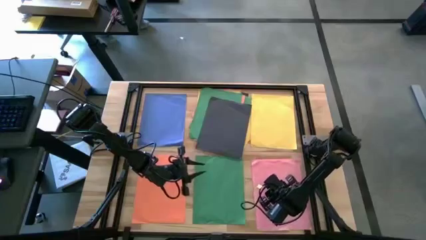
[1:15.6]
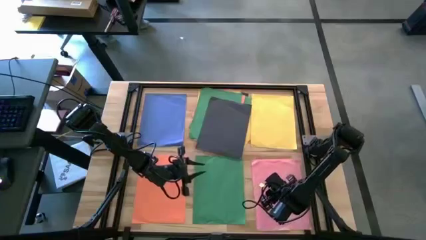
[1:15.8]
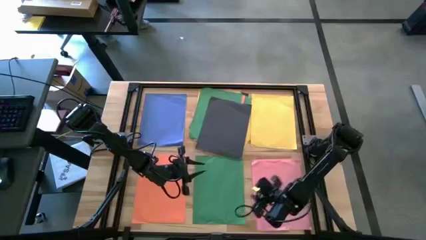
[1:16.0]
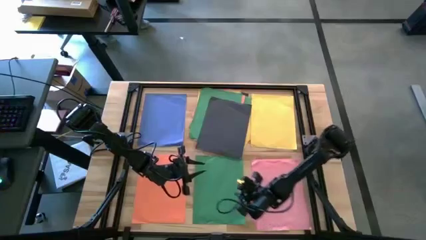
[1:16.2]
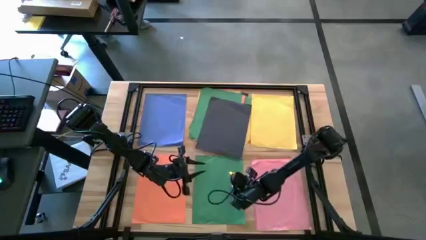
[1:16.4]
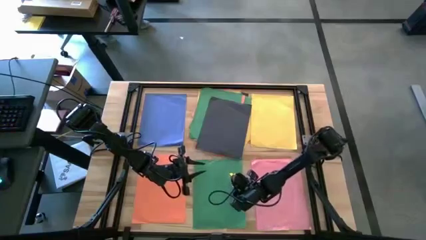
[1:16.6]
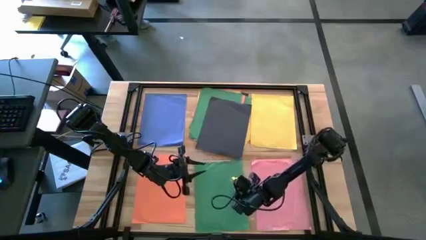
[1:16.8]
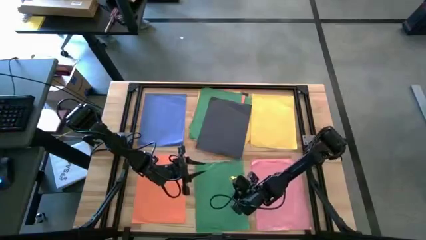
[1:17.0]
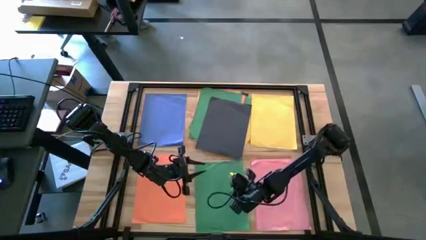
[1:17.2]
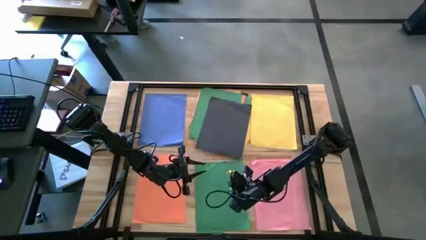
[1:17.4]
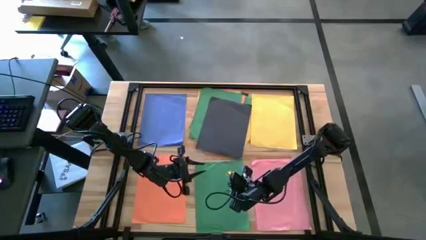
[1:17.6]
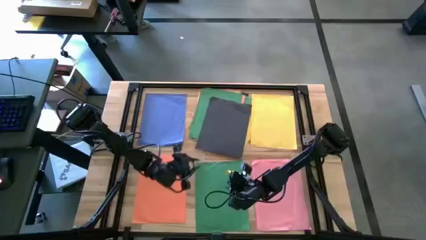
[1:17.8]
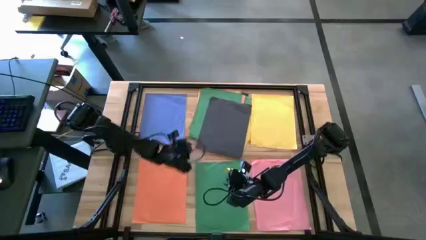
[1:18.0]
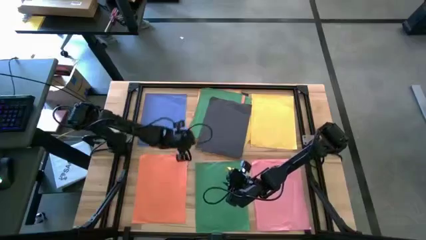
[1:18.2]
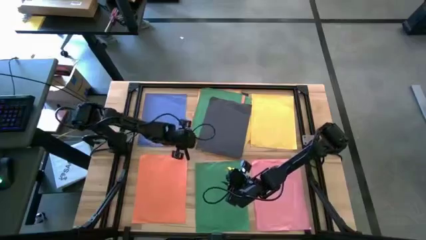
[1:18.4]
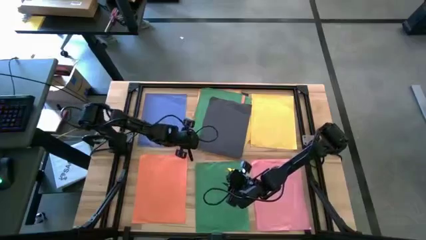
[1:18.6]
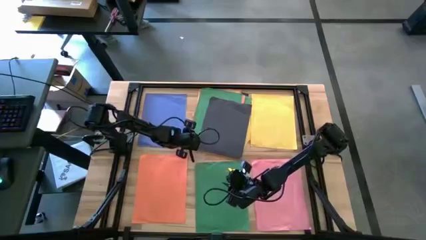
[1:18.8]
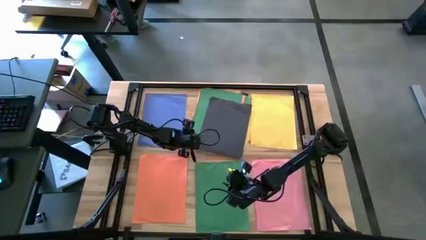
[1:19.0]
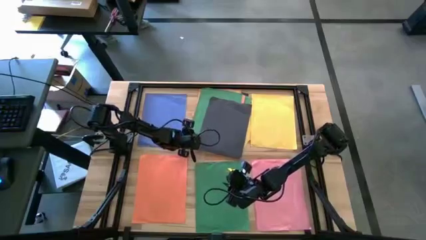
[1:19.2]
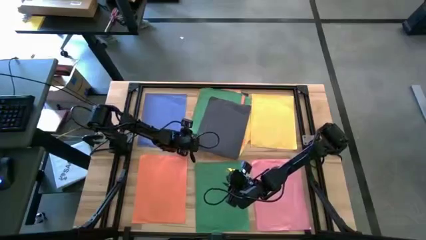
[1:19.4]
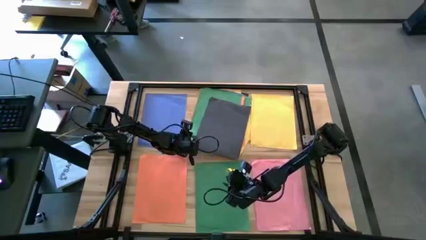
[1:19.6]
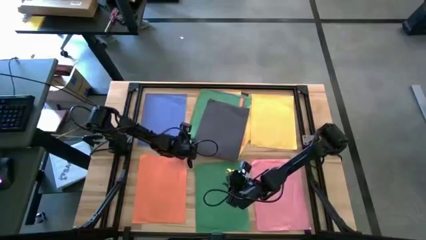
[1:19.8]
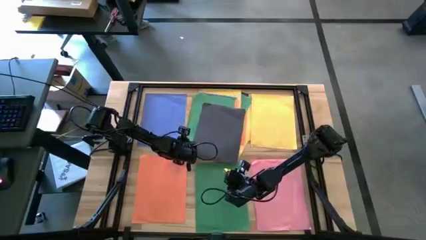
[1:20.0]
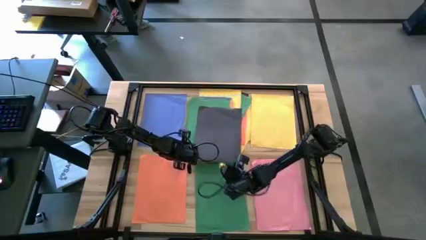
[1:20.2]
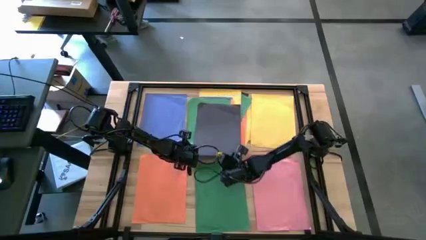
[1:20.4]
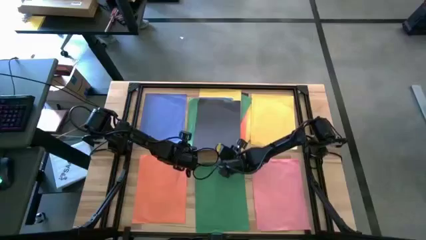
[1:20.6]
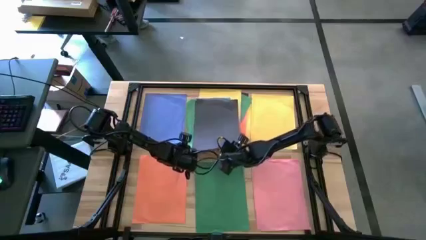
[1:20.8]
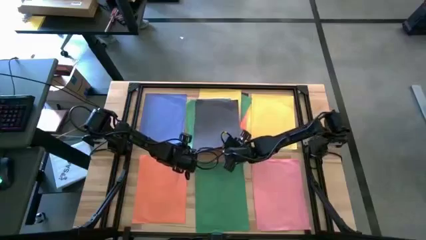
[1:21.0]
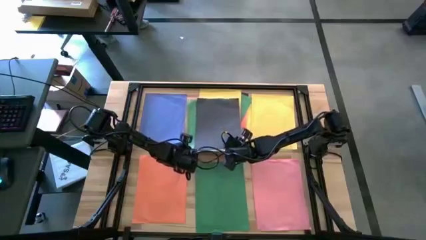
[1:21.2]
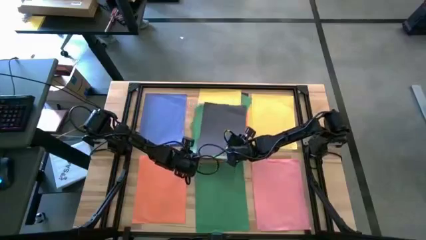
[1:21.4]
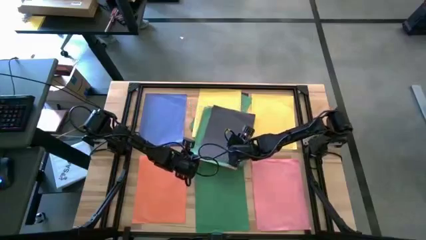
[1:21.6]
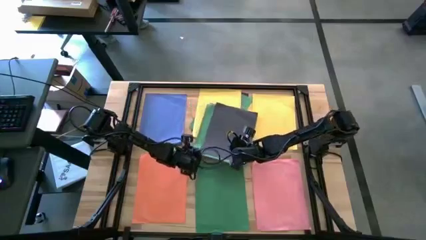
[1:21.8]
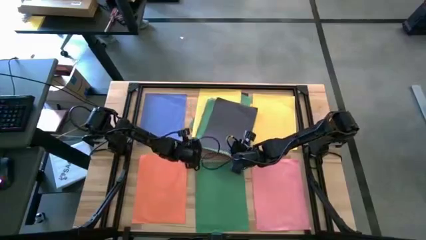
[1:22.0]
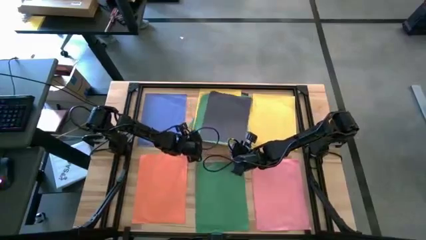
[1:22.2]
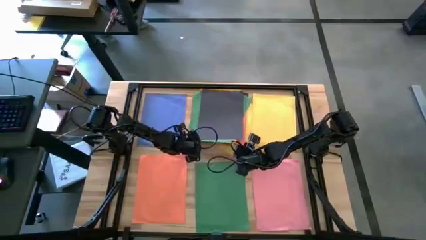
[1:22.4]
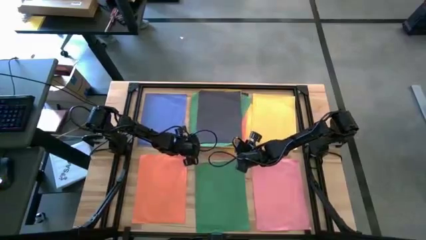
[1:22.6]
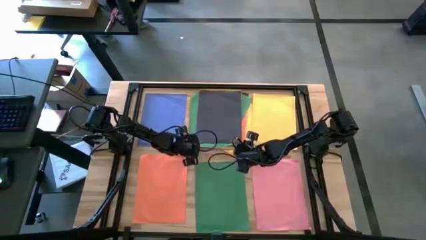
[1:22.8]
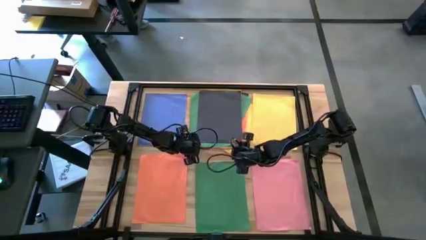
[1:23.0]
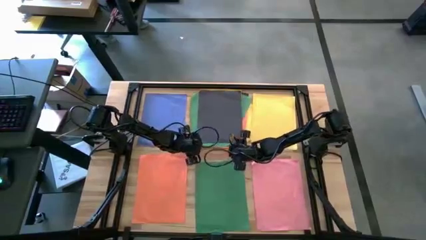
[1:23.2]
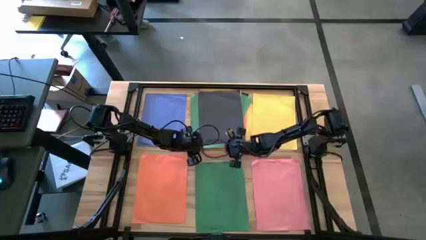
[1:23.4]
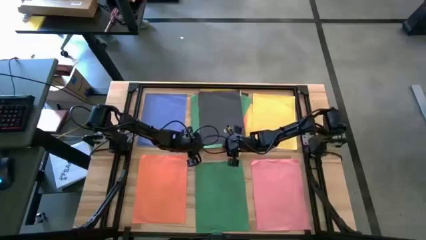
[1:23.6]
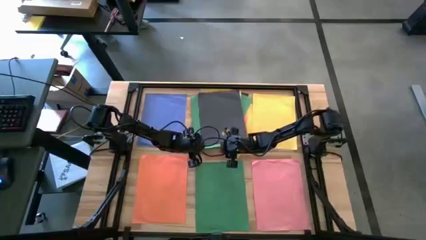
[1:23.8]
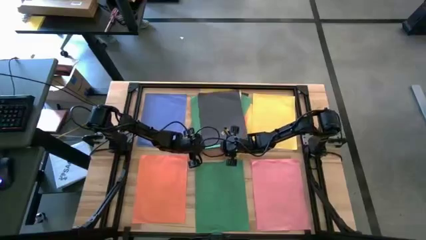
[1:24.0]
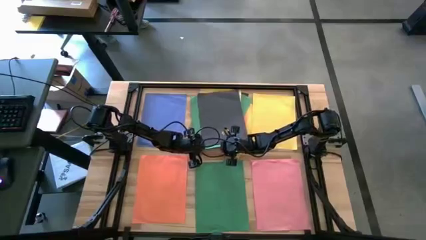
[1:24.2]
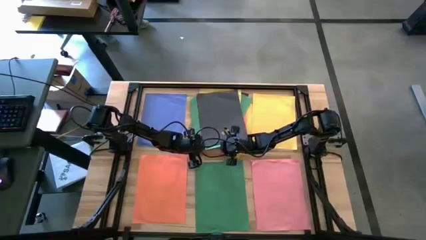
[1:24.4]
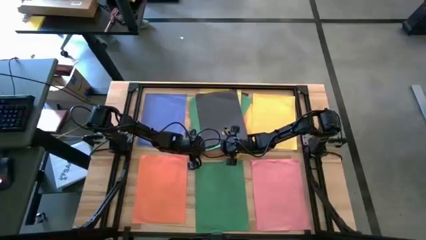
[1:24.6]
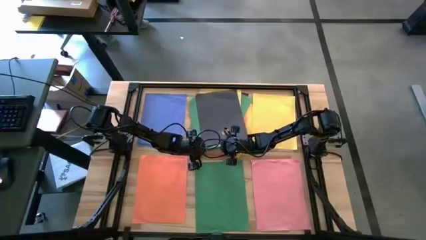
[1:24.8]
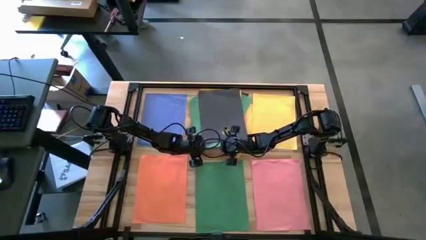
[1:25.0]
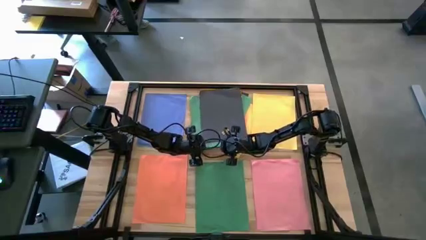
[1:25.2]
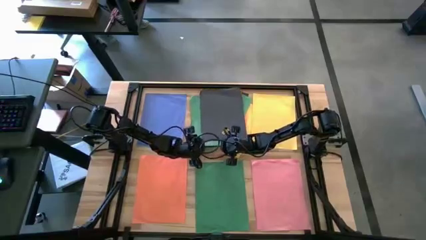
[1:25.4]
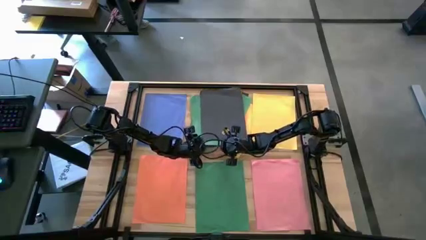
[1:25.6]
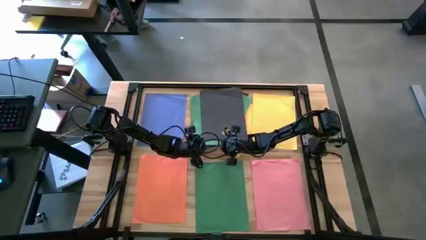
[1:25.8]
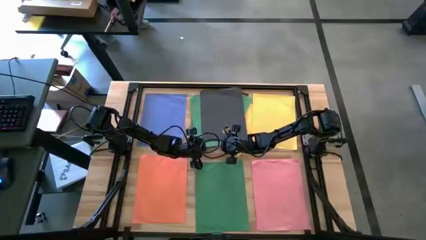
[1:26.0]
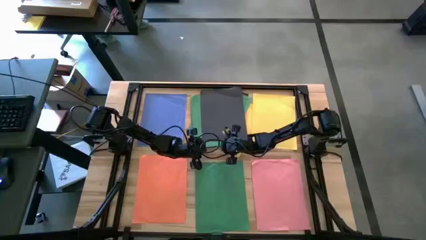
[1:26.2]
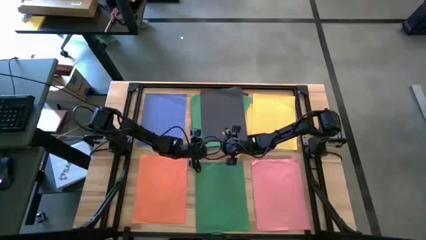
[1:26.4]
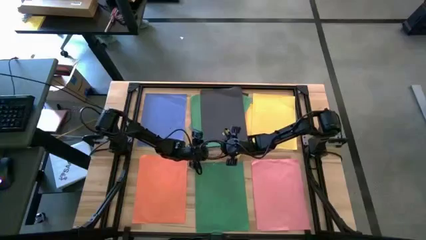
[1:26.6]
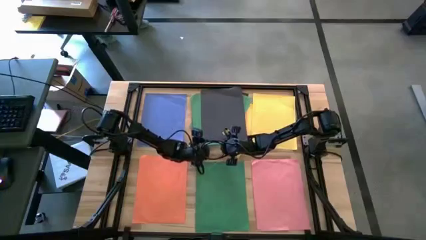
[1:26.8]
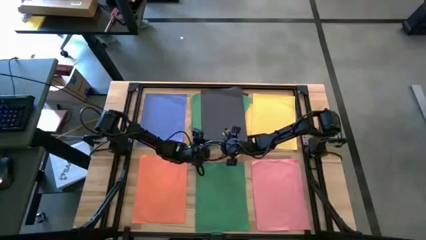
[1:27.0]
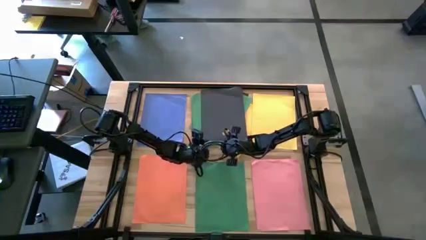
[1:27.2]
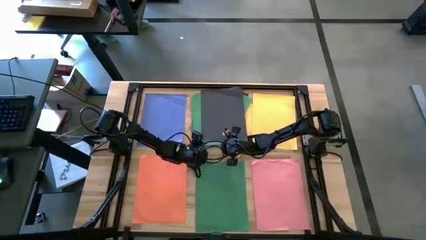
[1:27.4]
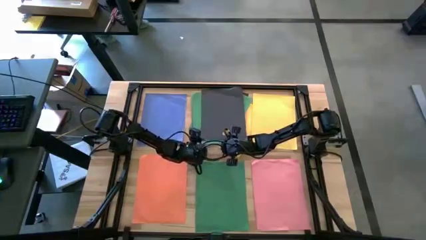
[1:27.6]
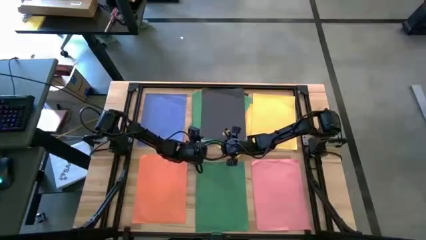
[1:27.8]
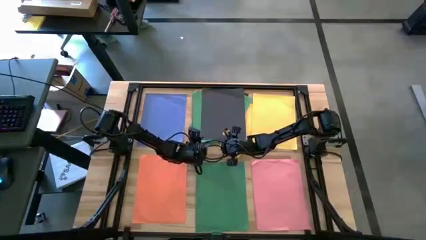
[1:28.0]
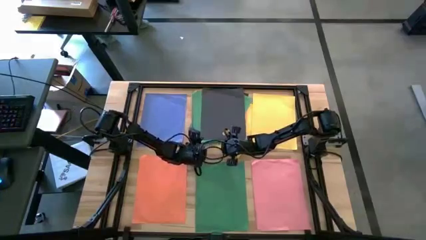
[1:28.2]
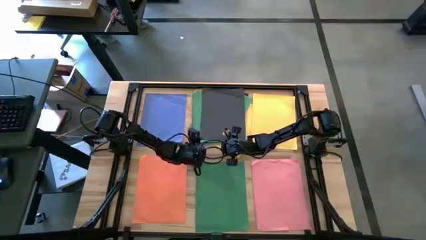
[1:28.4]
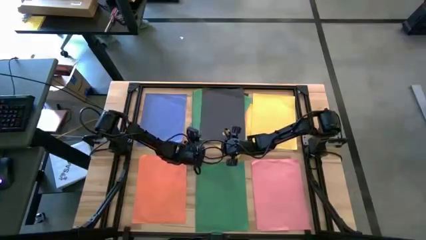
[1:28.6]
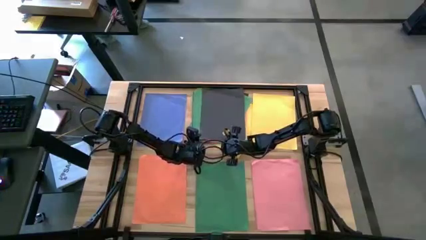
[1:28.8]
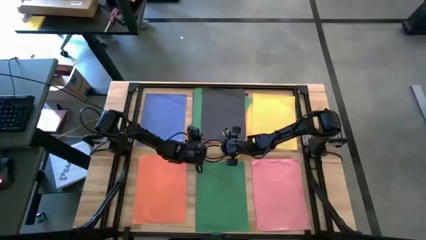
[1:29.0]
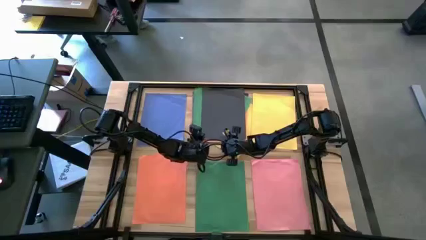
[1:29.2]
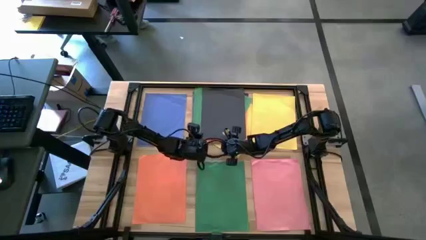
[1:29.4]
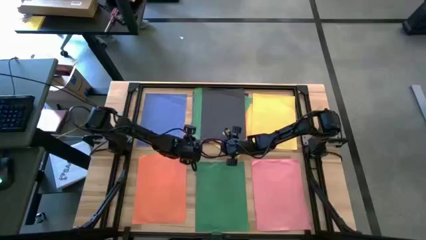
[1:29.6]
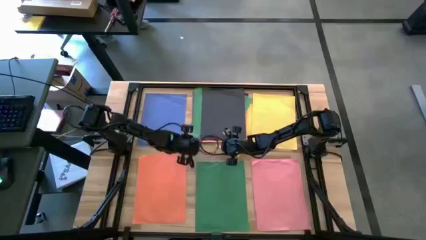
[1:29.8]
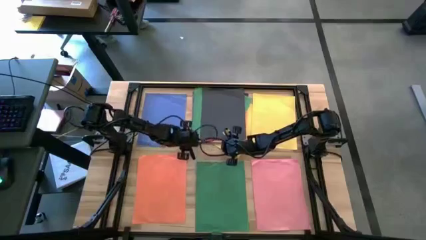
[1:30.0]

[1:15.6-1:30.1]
Task: Organize paper
Stack the green paper under the black paper on the bottom green paper
